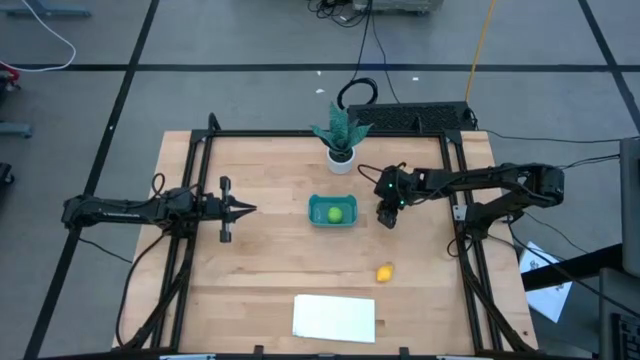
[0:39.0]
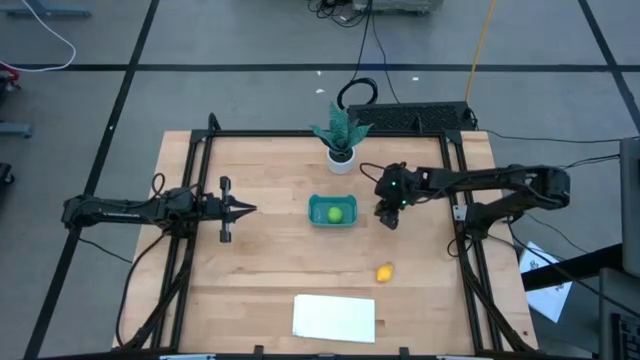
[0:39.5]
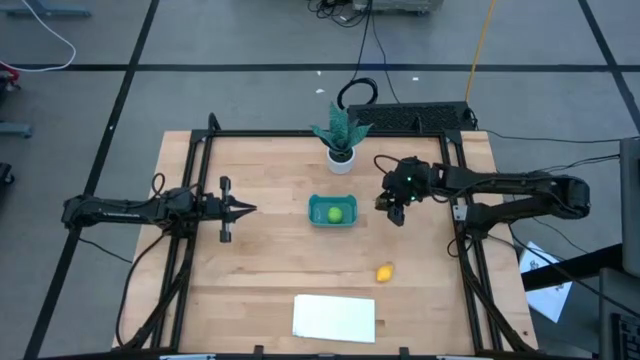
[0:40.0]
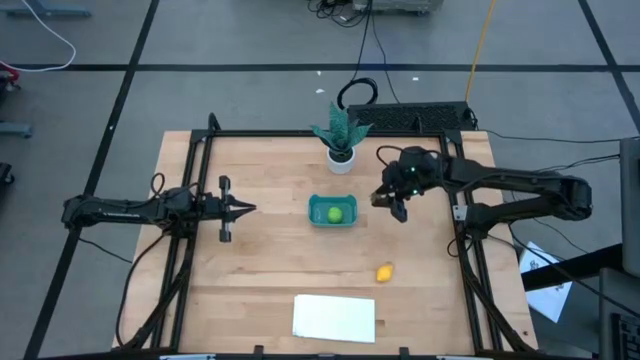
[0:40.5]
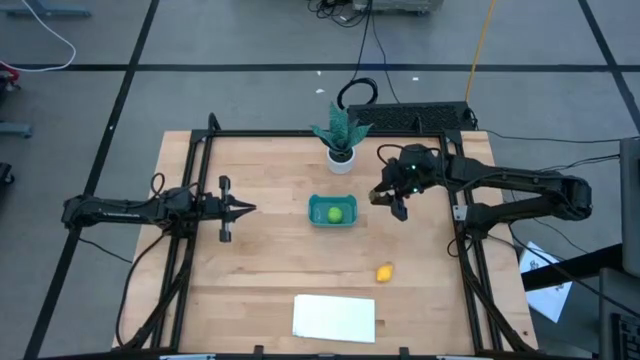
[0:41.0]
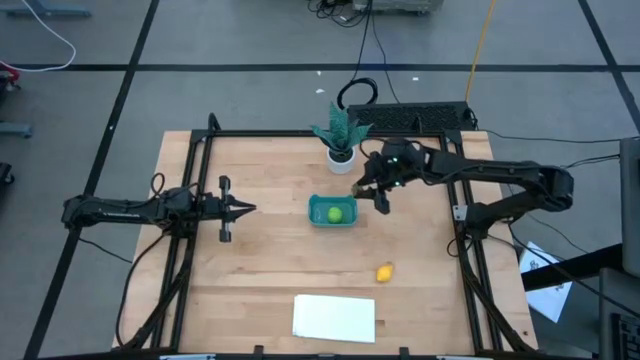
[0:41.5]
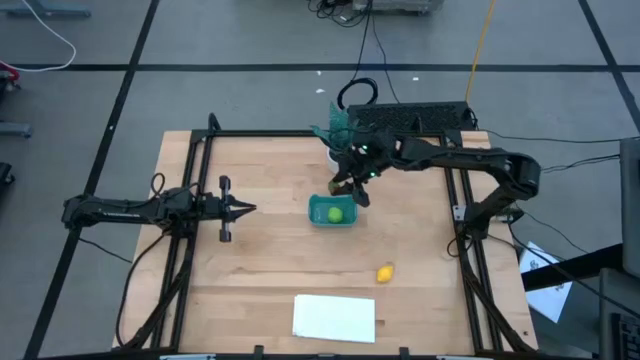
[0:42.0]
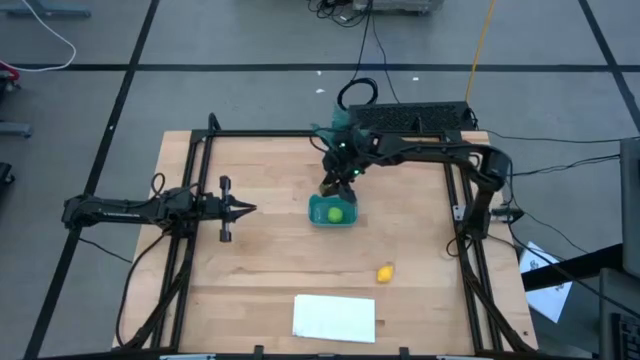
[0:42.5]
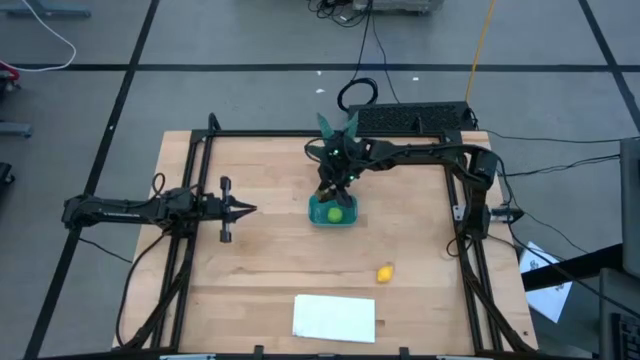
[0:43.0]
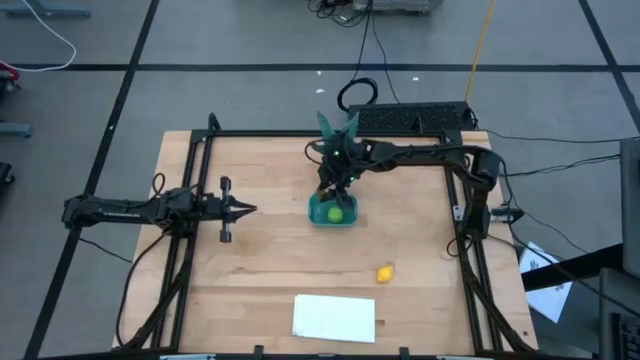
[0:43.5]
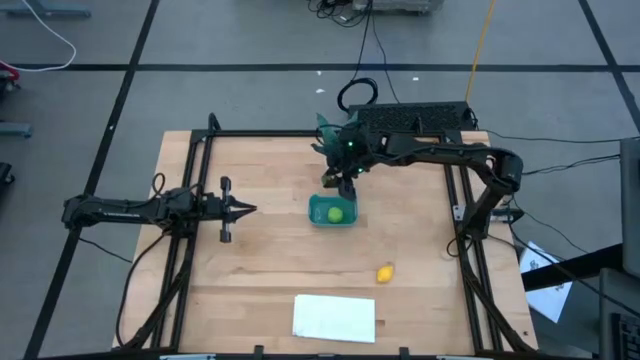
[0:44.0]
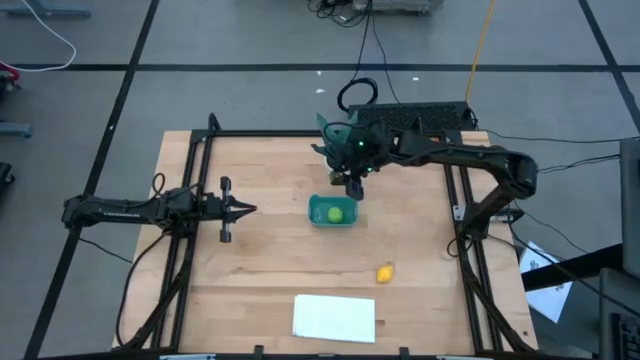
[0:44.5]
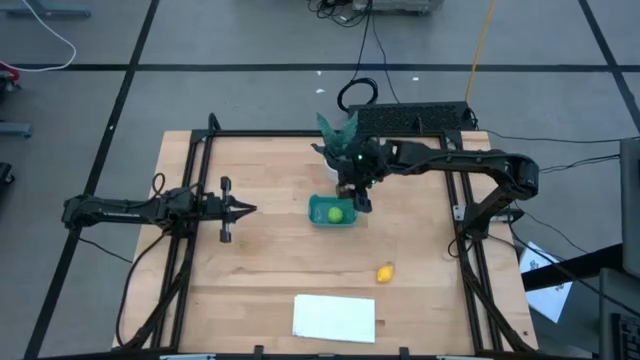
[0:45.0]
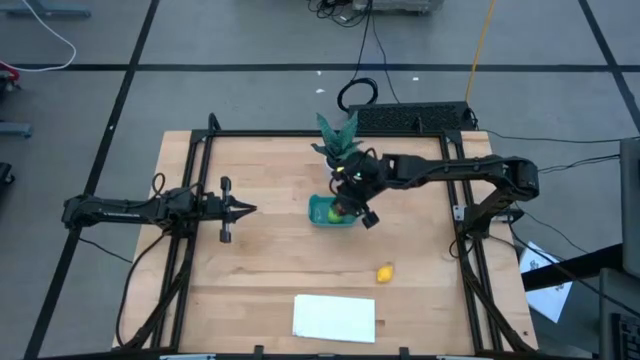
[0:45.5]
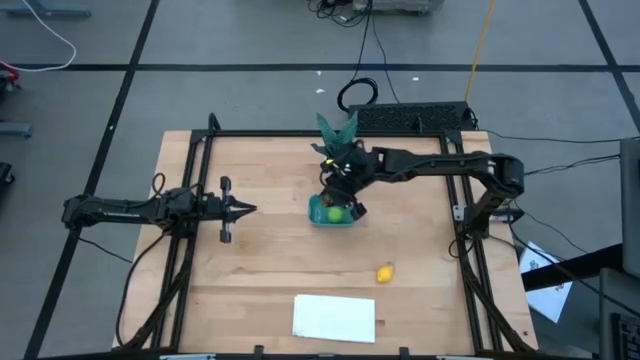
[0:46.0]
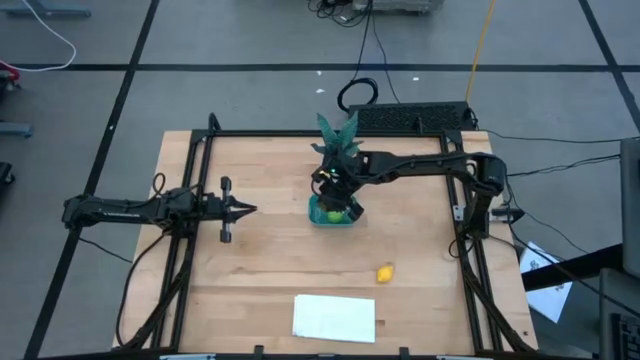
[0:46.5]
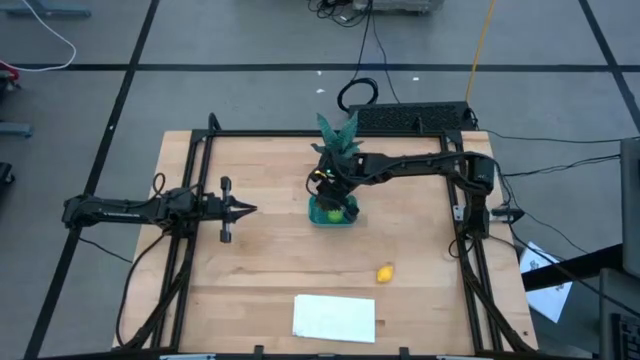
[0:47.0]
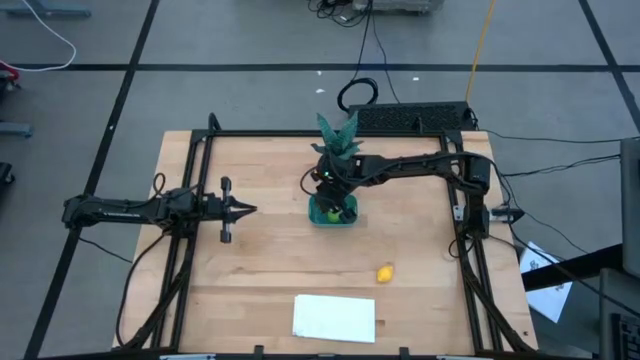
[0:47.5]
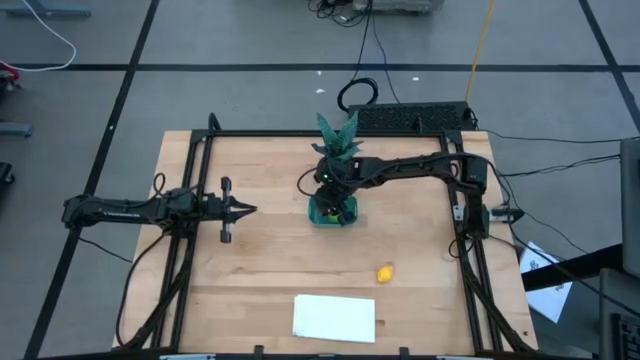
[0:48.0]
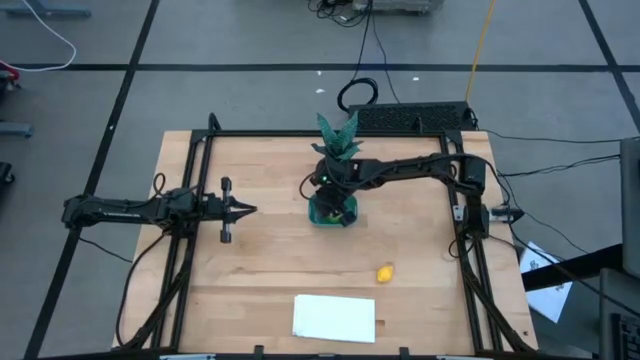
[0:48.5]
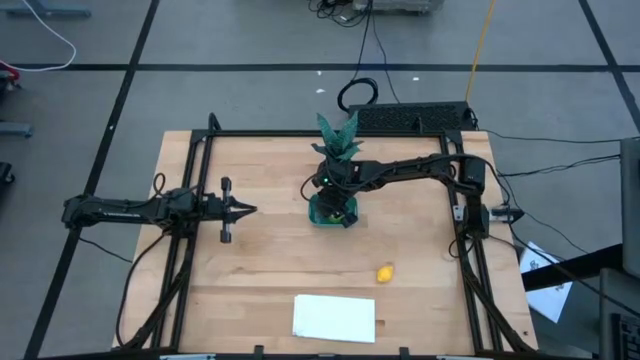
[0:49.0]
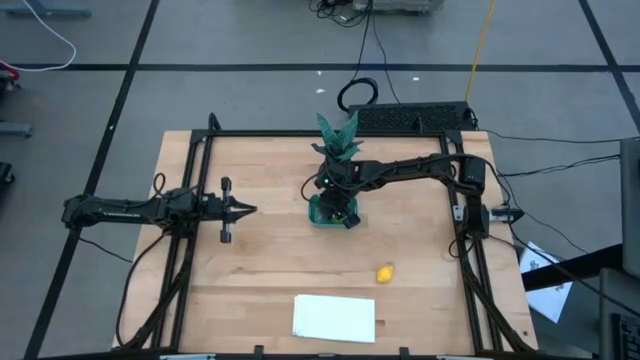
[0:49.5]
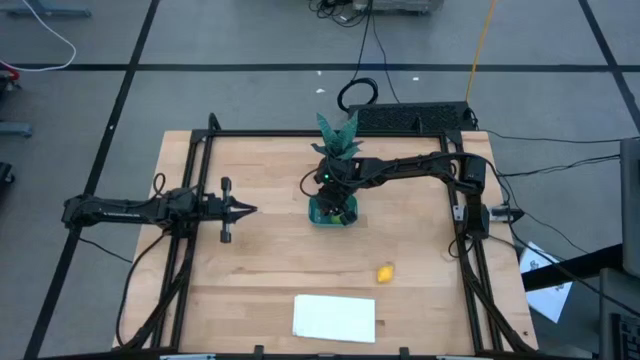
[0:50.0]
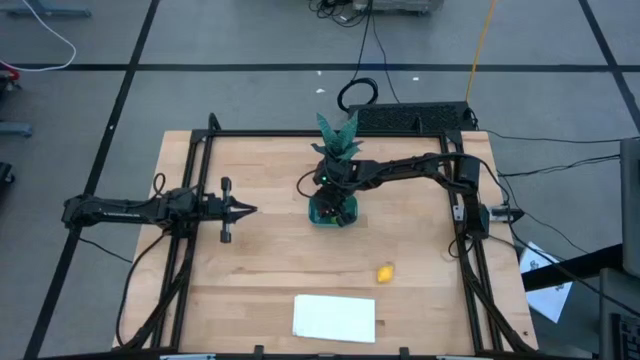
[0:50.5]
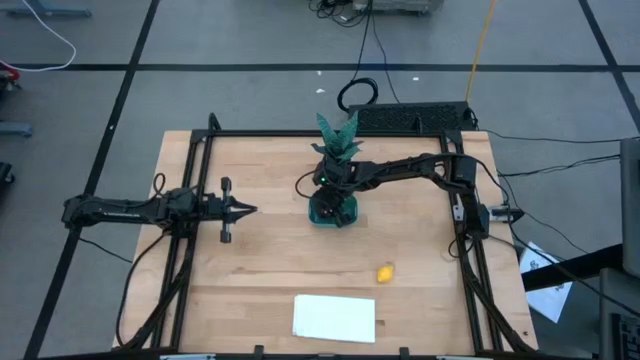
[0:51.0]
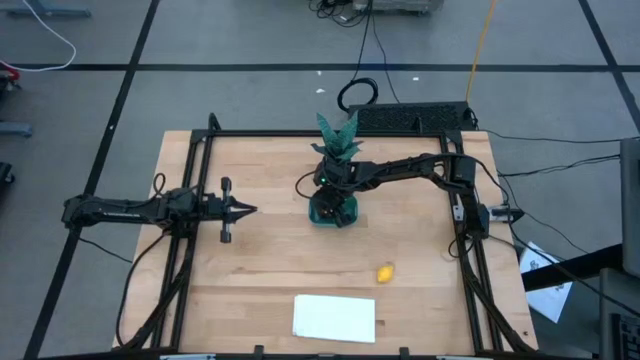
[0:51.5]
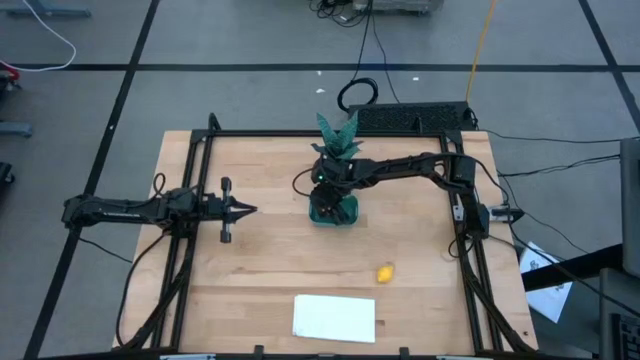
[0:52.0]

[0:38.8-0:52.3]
Task: Pick and placing Produce into tupperware
Put the red strawberry into the green bin
